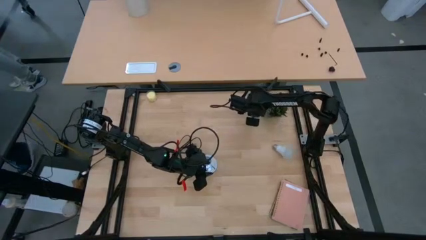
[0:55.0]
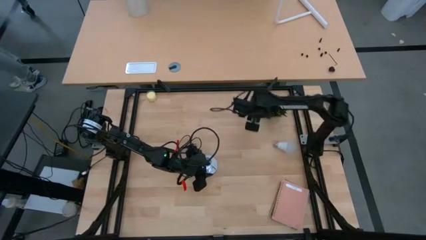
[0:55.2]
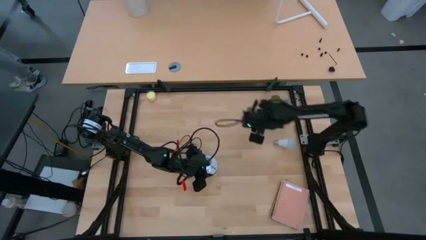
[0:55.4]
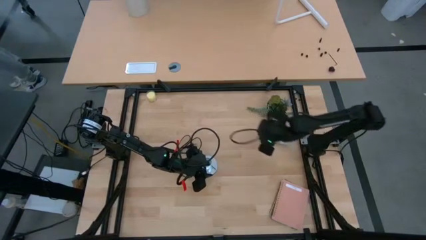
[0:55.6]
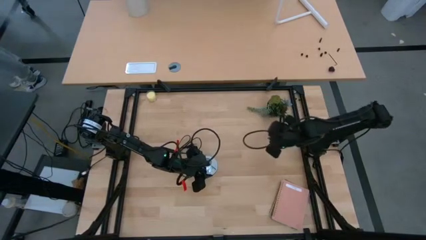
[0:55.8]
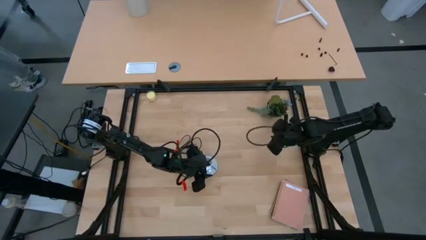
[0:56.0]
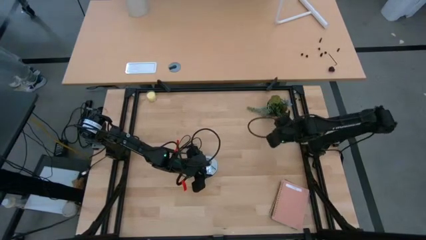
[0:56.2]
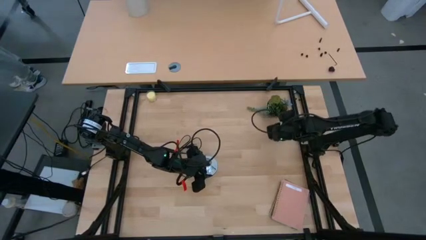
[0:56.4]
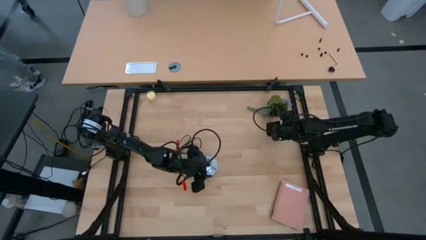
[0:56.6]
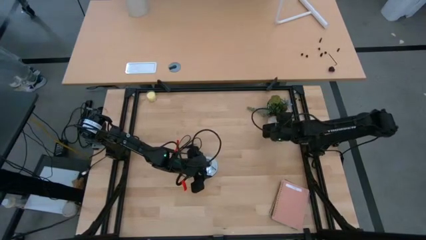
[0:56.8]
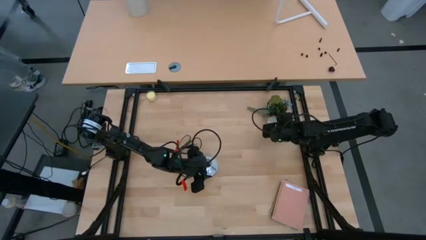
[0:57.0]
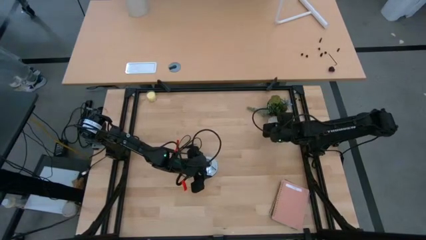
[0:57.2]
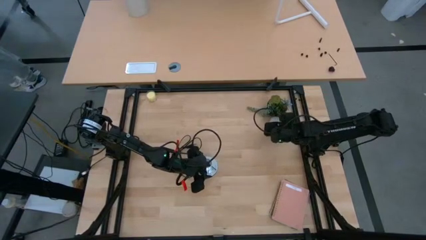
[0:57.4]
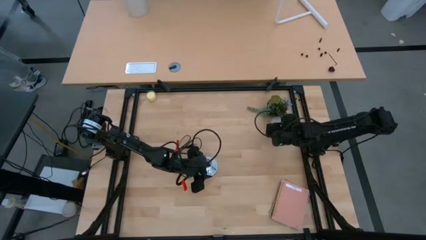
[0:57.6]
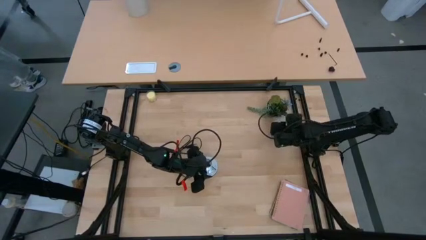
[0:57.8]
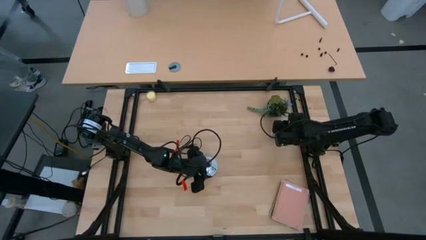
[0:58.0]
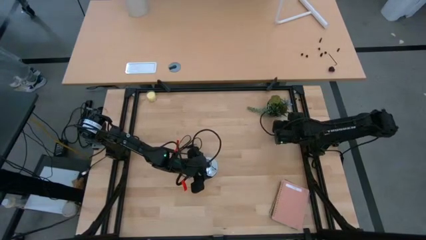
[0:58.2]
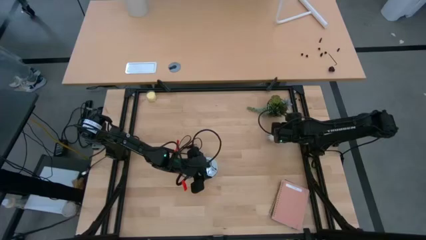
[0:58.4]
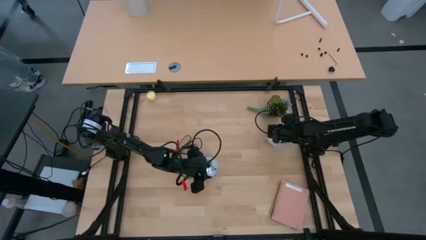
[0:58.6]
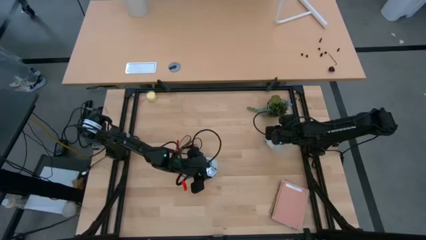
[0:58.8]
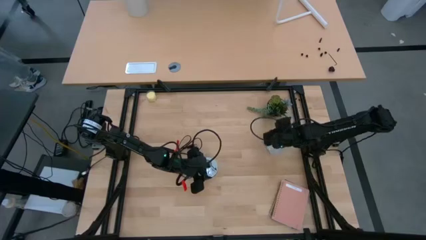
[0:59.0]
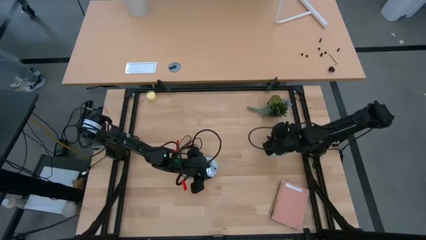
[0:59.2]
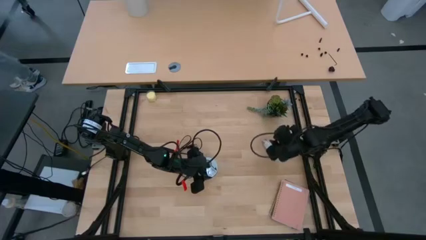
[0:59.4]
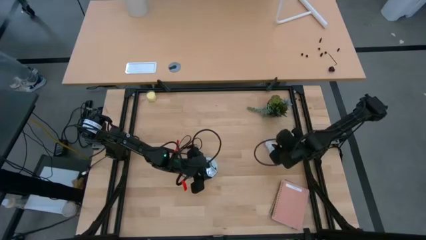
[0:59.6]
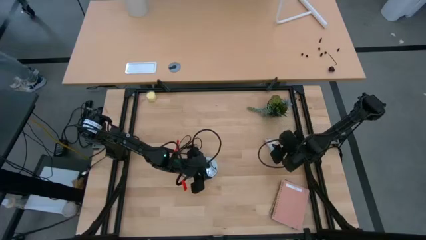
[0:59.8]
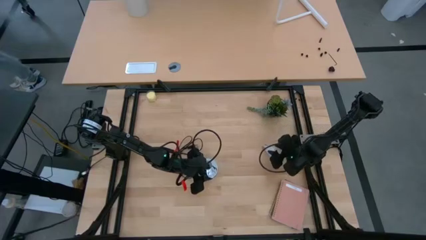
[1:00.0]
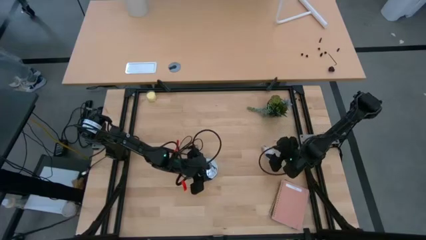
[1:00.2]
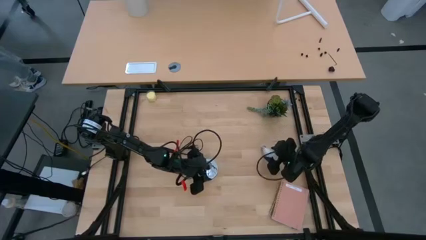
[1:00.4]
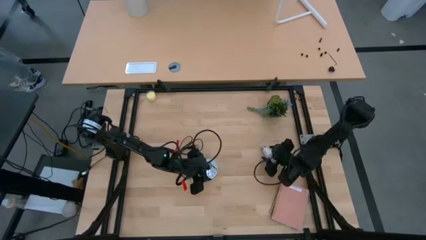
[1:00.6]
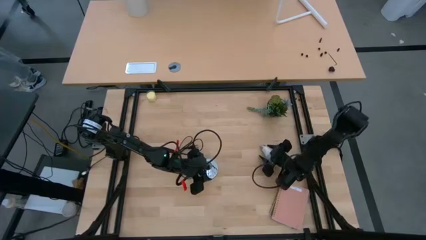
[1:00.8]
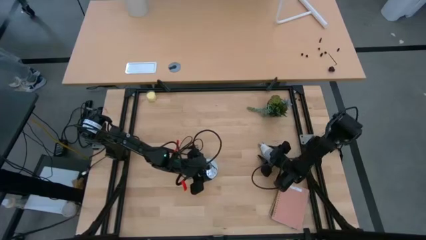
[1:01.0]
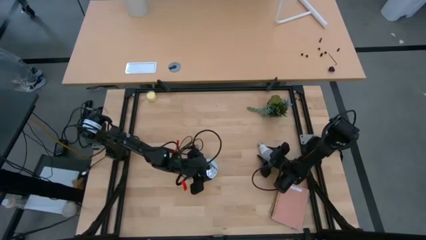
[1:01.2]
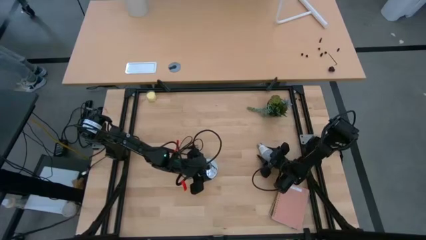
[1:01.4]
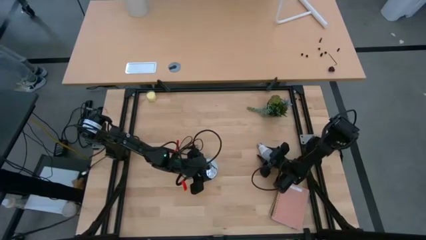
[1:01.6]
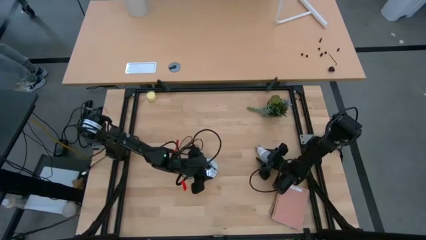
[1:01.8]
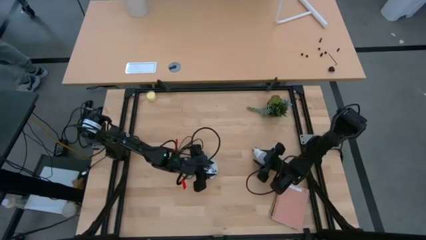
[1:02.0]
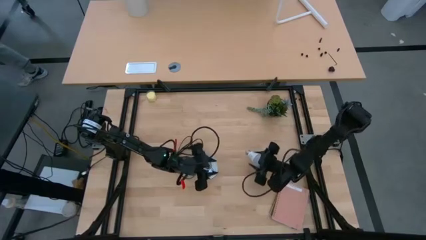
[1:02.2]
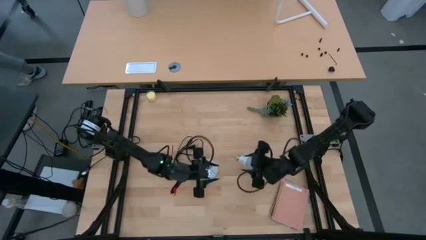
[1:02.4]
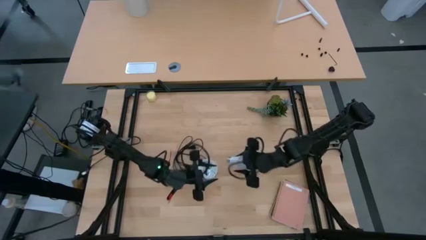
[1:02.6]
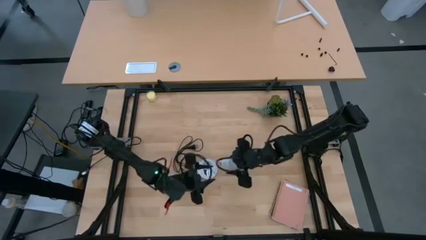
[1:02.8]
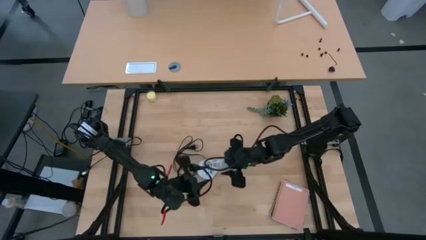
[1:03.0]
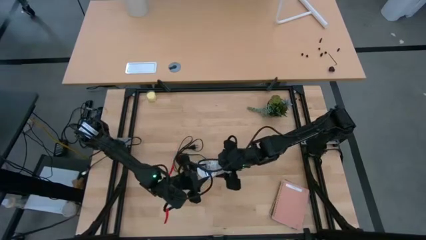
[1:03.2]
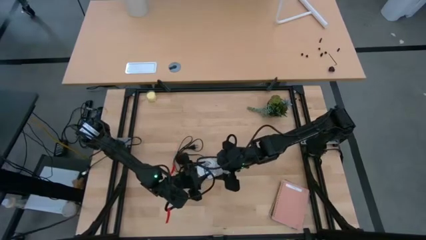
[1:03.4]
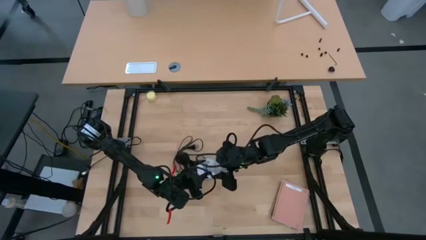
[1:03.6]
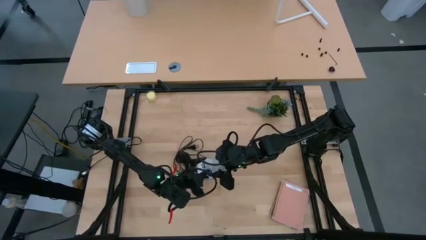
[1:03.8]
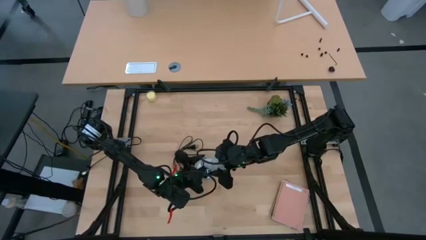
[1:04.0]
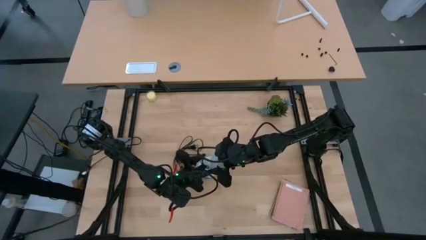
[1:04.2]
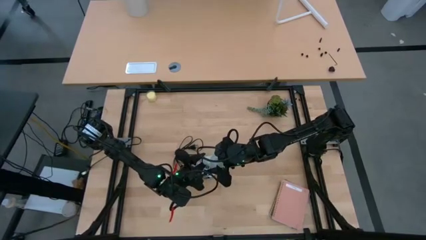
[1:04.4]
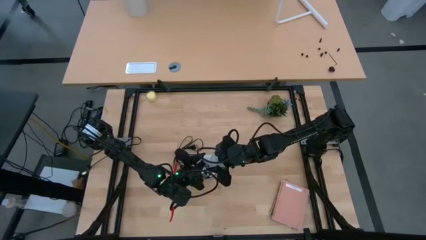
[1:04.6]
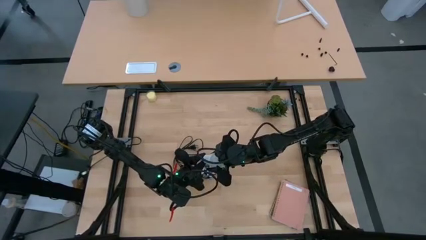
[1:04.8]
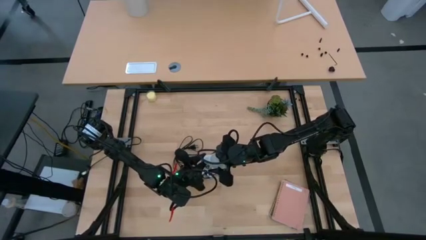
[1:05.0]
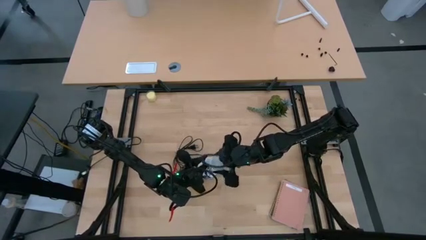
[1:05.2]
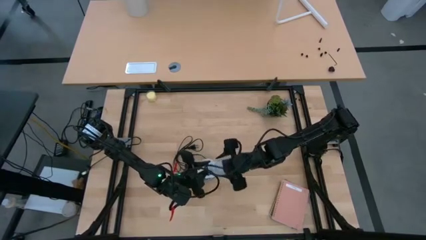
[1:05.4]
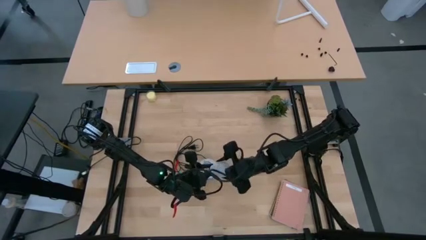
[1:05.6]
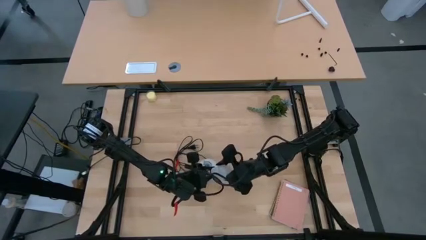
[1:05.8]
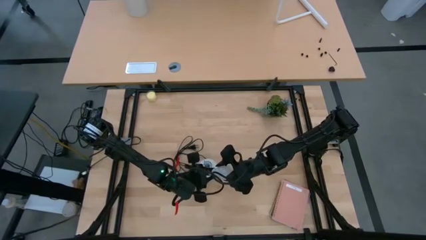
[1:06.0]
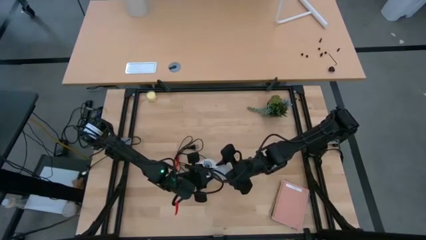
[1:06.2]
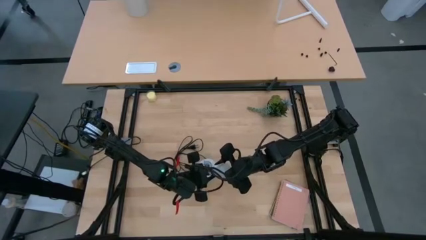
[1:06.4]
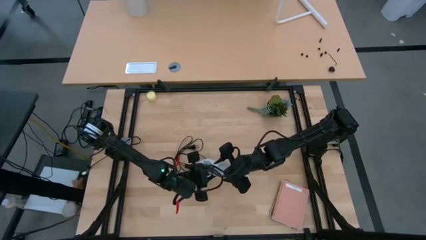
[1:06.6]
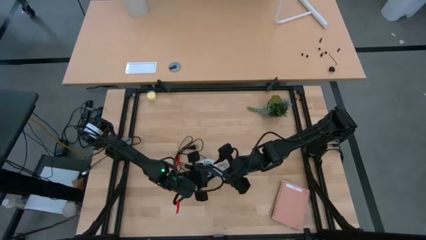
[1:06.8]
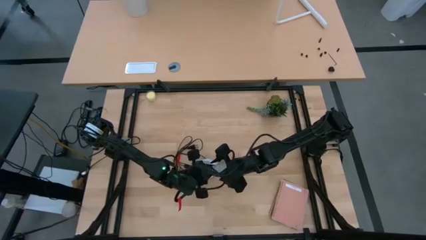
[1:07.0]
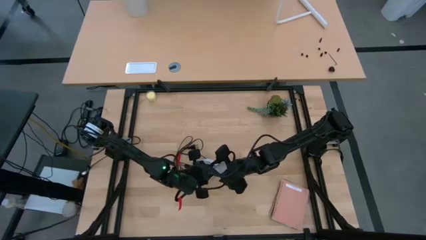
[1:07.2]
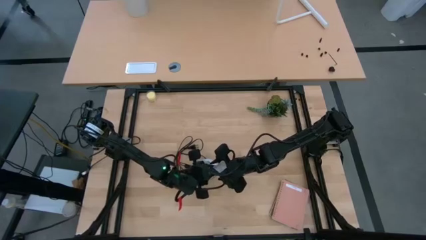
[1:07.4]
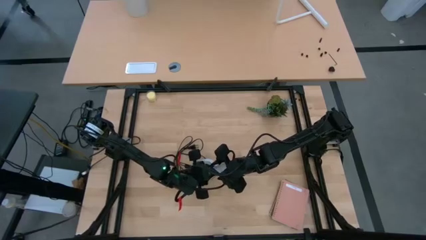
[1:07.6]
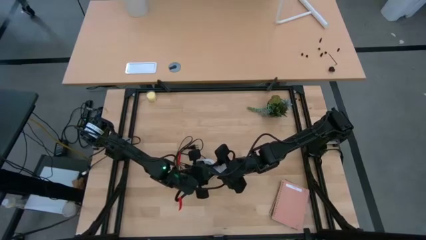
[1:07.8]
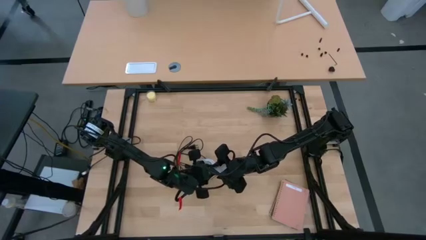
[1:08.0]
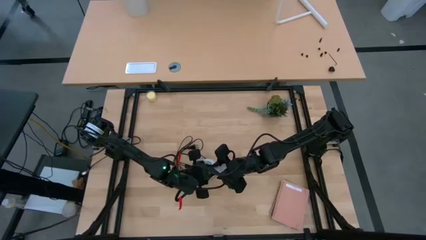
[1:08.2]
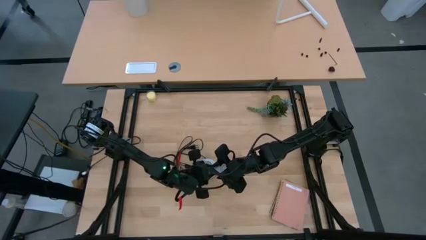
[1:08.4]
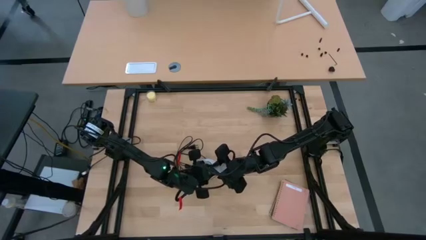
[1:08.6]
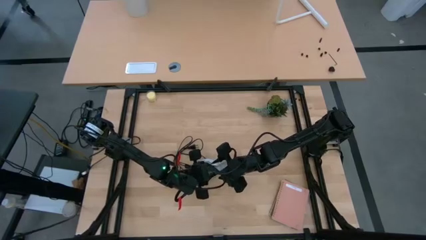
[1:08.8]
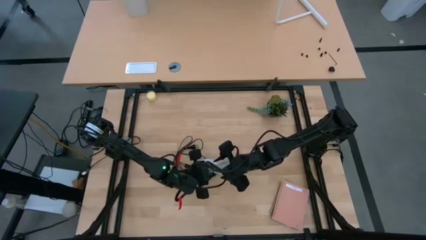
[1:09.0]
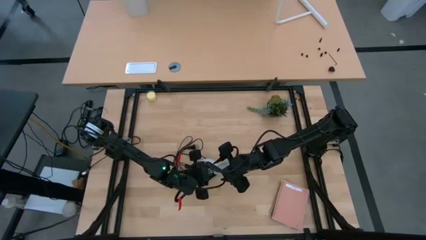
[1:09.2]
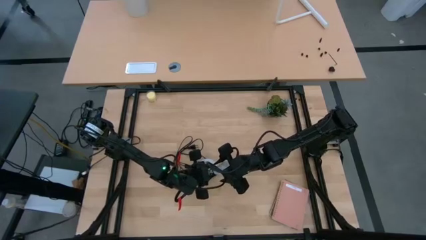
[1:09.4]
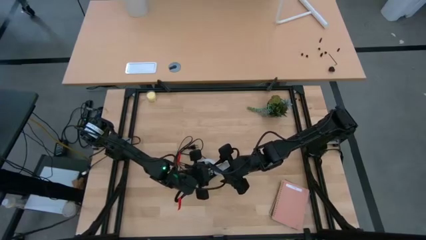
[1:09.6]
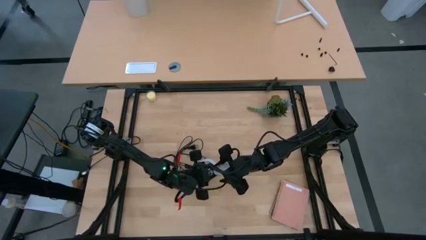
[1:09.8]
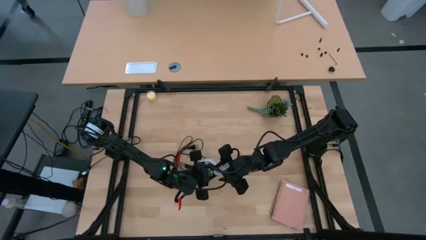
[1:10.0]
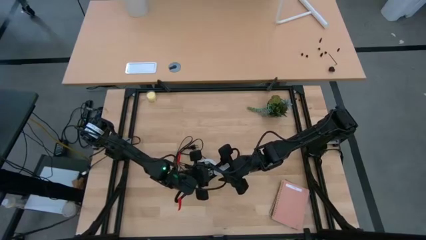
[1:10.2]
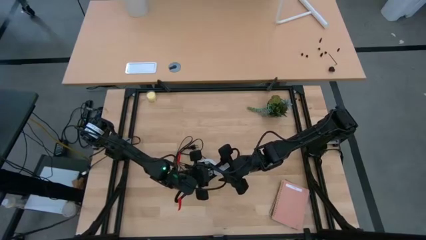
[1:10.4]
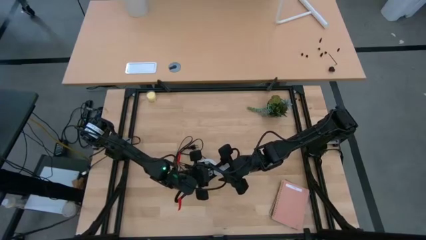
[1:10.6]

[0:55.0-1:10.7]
Task: Screw lightbulb
Insert the light bulb into the lamp
